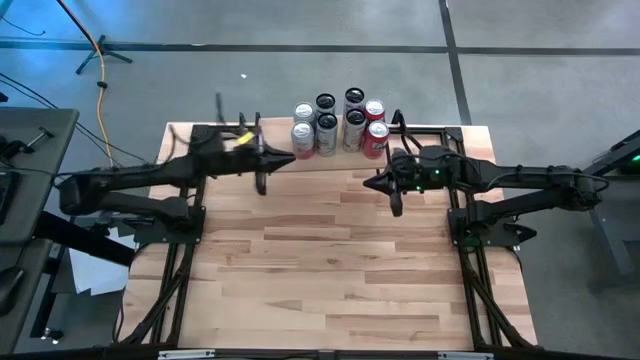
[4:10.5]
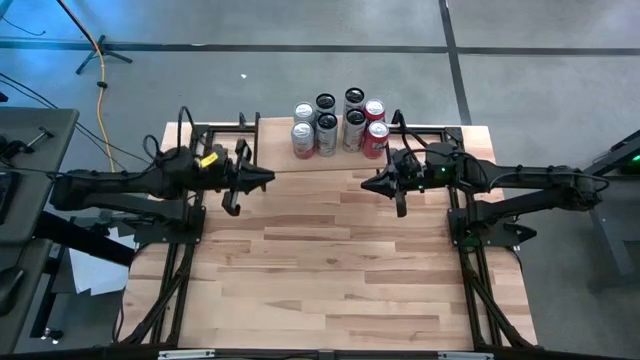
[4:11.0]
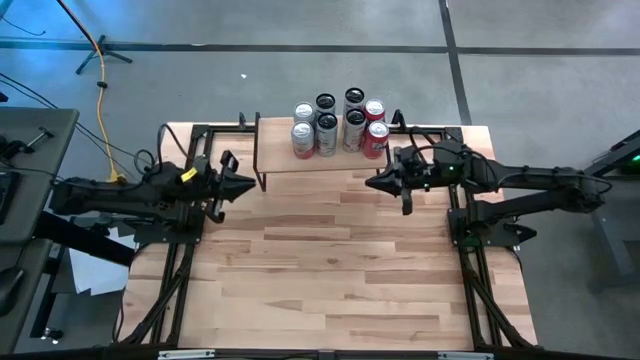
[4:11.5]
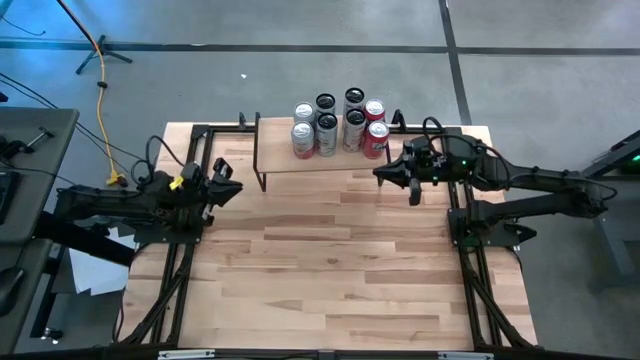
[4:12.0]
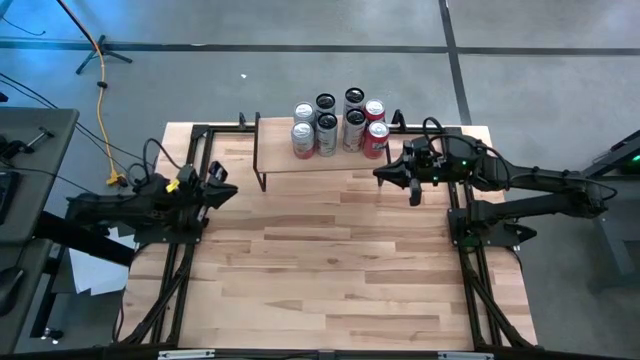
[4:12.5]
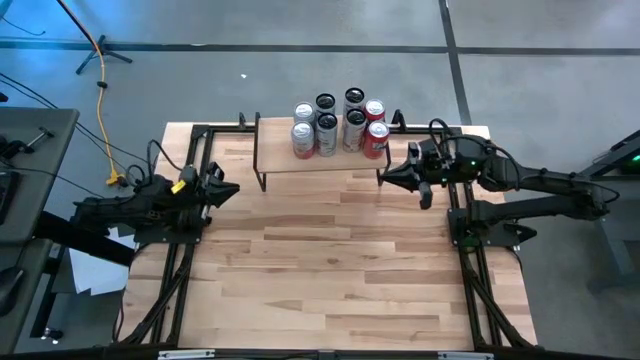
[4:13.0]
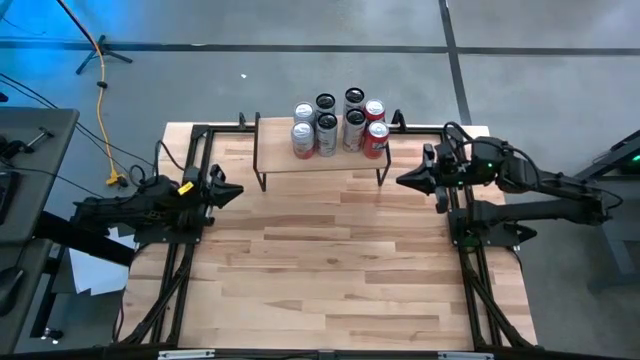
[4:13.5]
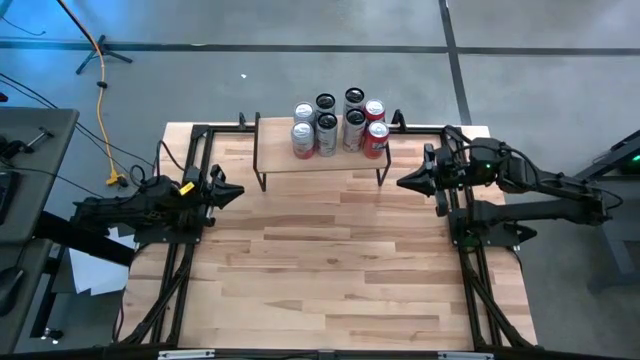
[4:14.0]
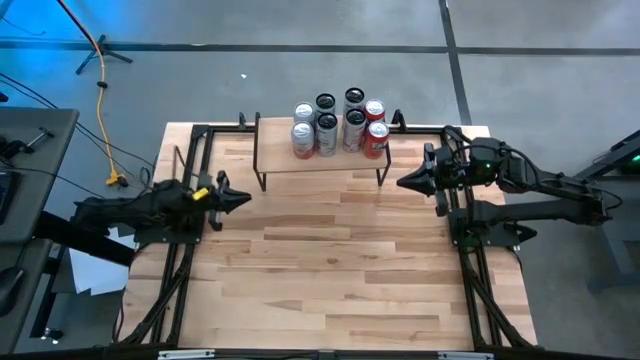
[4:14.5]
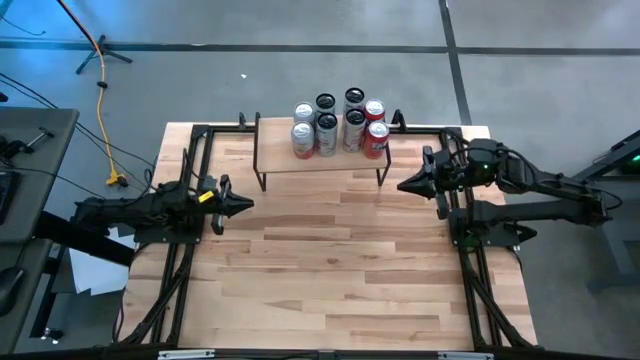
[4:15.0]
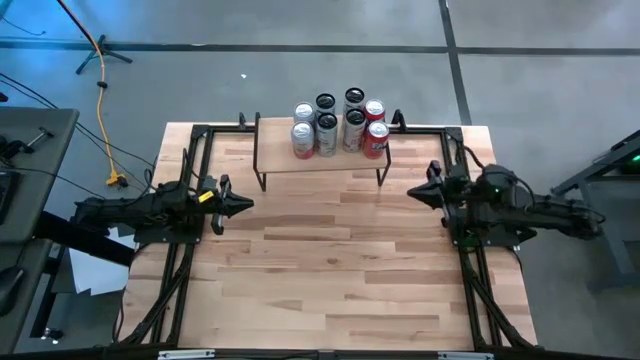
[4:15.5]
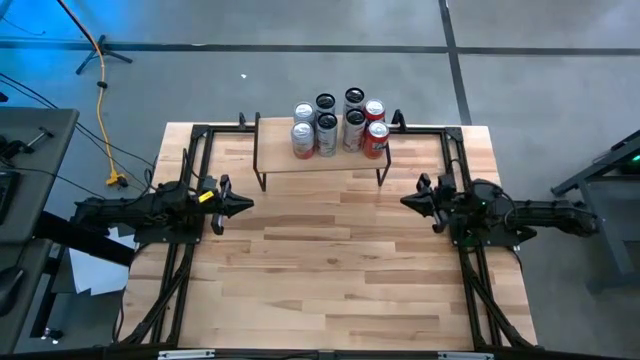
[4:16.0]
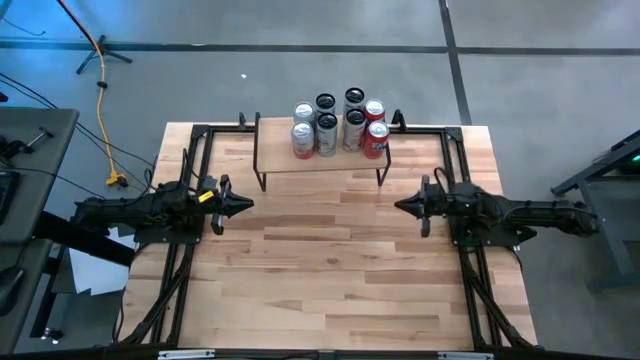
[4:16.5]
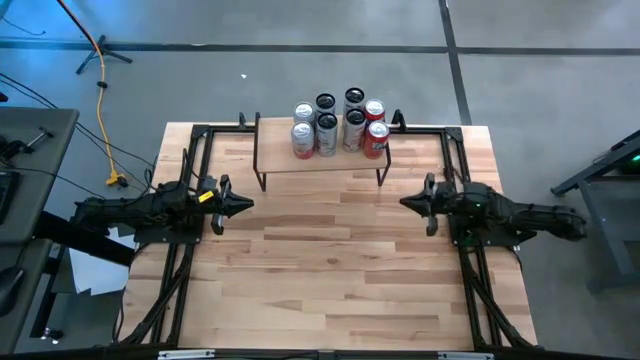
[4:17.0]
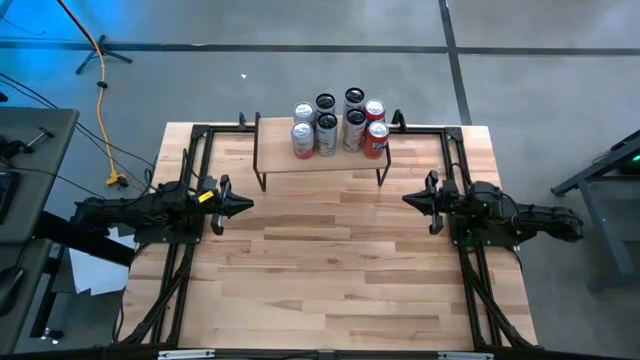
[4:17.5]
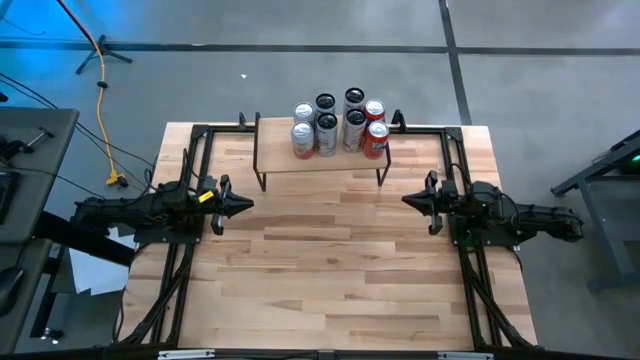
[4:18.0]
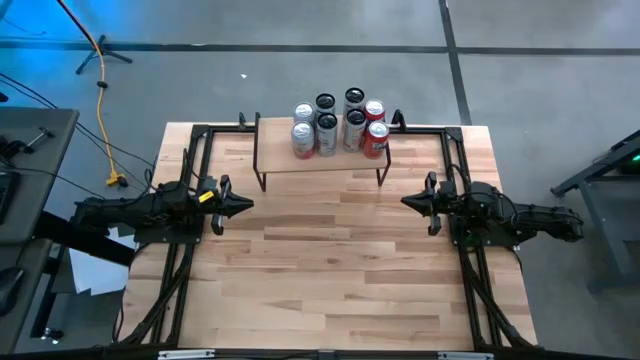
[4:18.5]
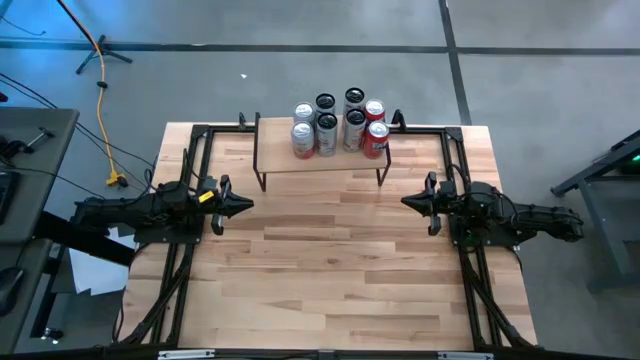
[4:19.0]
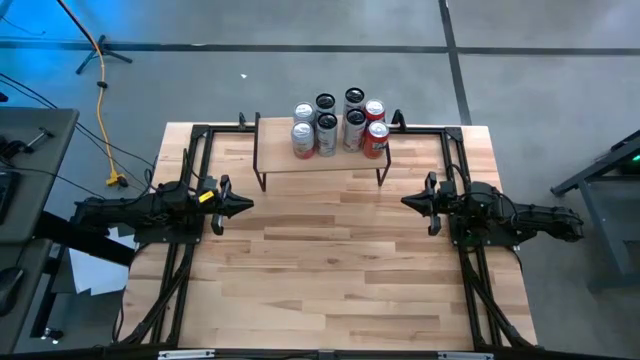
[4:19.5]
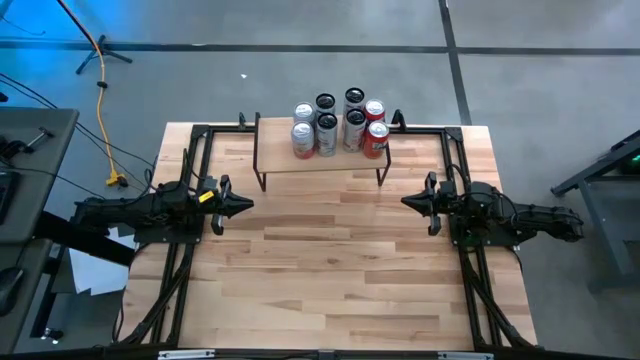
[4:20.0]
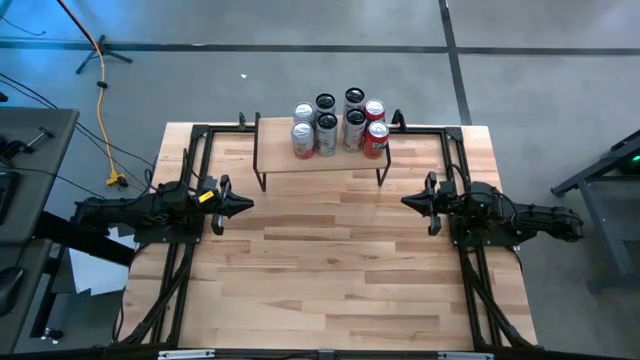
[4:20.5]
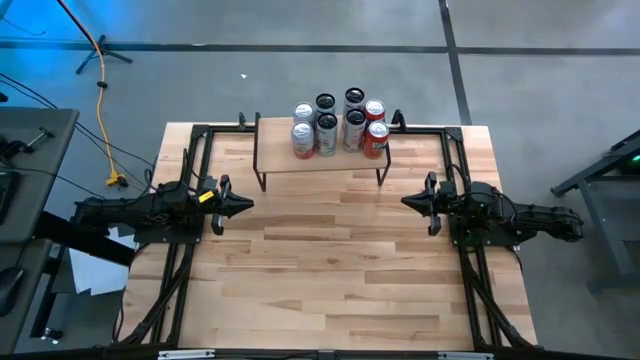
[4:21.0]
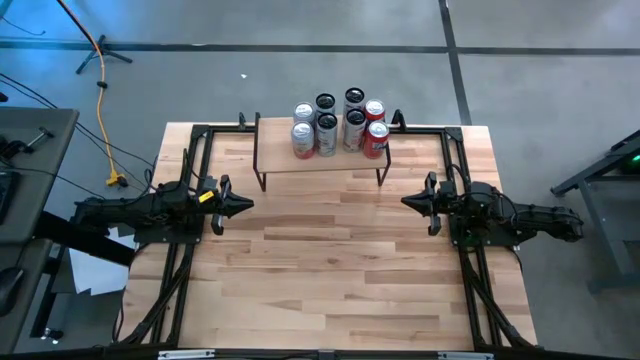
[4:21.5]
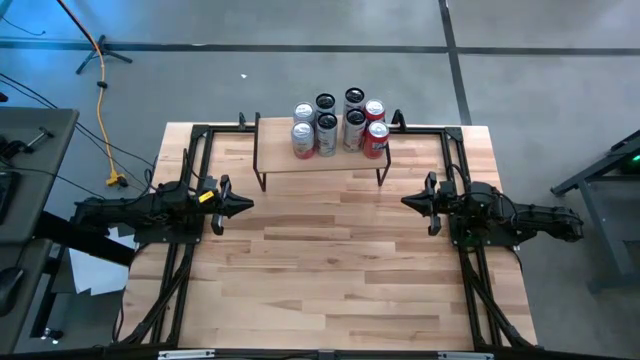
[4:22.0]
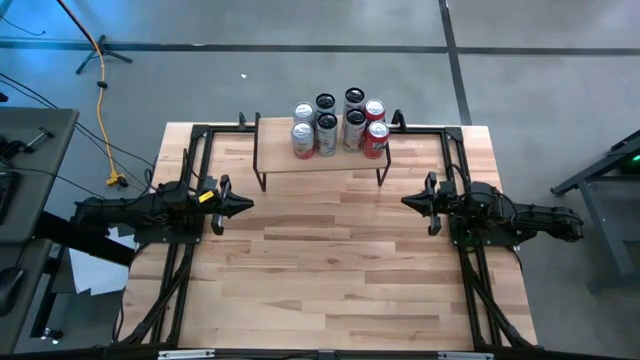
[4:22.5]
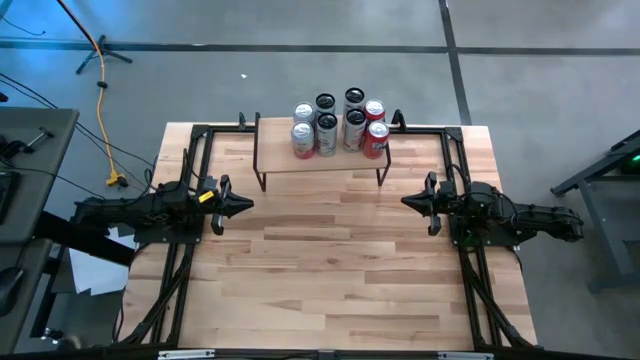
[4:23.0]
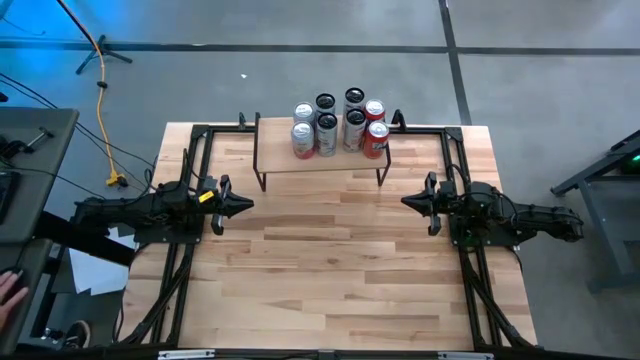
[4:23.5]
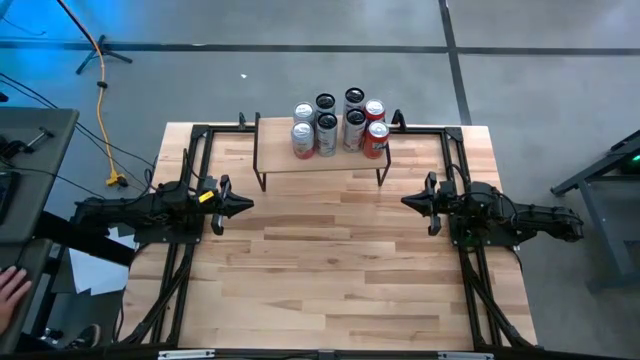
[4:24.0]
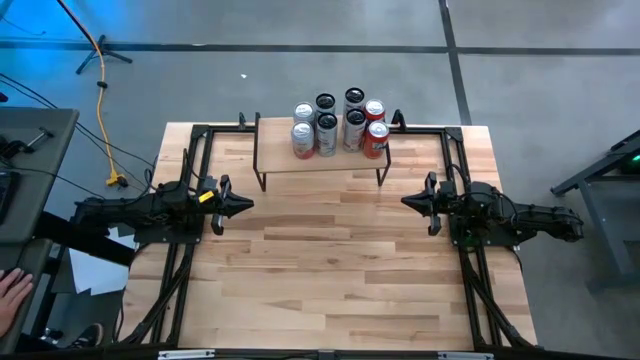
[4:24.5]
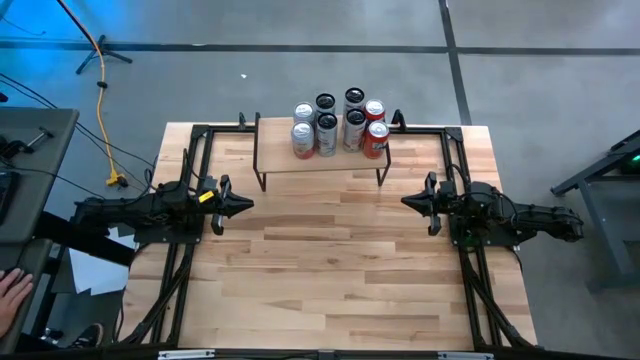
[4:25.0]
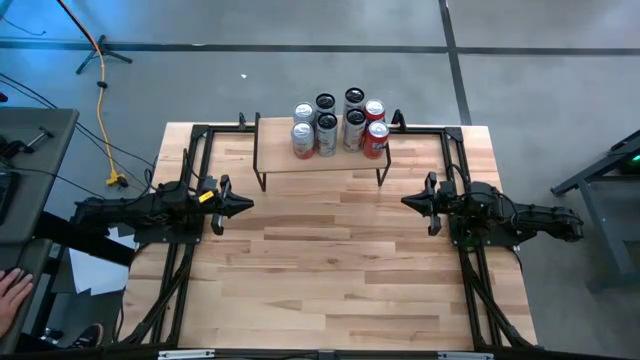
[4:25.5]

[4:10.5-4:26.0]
Task: Place canned beverage on shelf
Return to Home Position

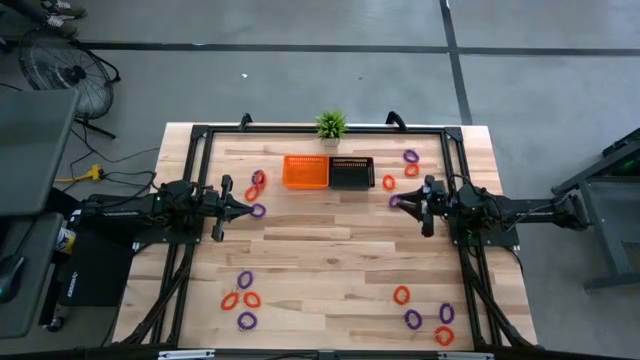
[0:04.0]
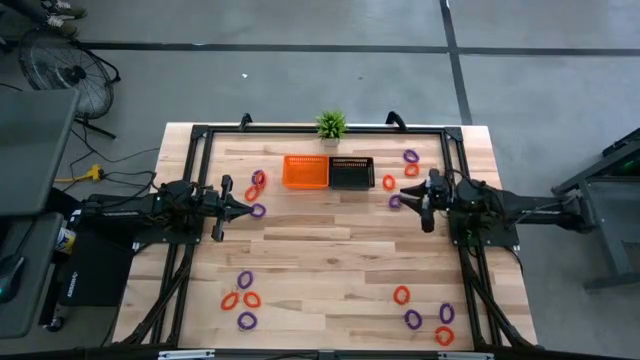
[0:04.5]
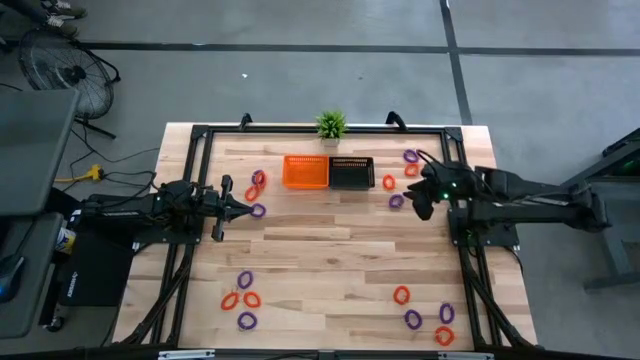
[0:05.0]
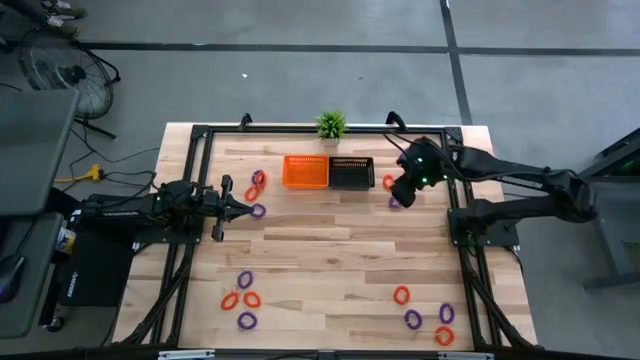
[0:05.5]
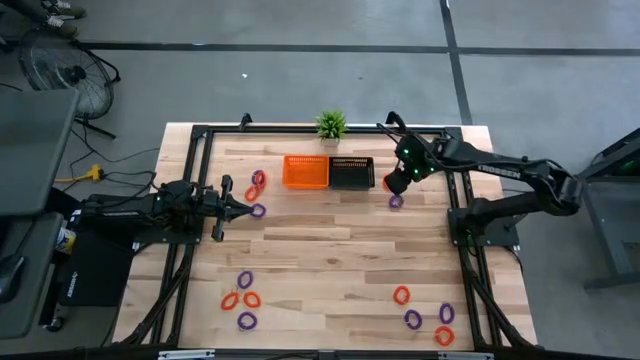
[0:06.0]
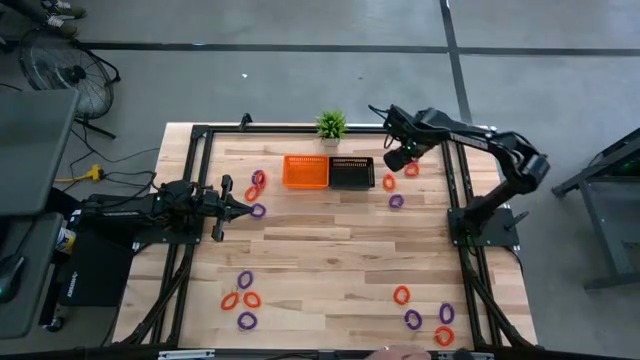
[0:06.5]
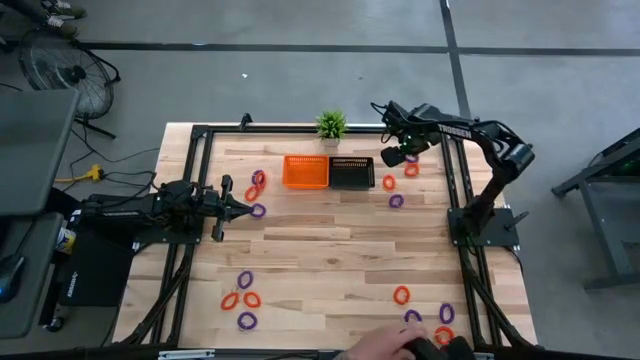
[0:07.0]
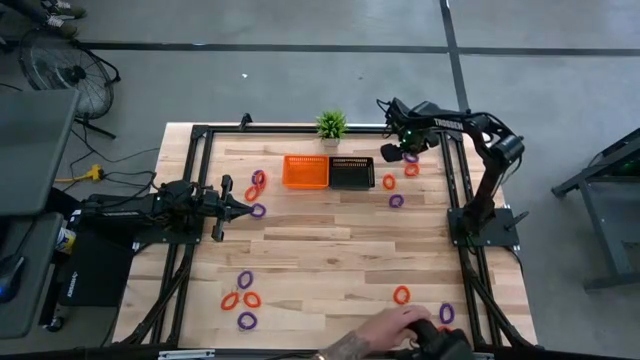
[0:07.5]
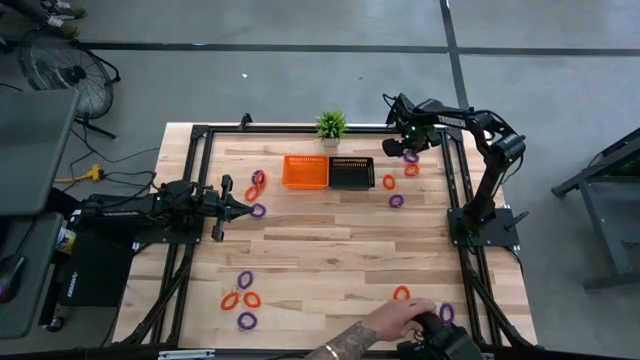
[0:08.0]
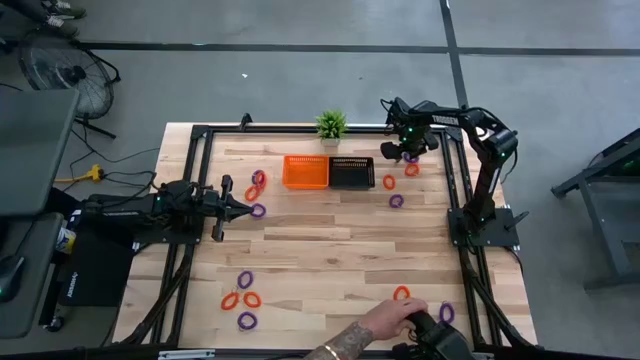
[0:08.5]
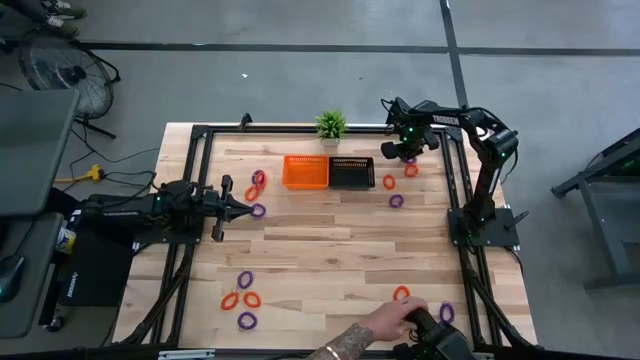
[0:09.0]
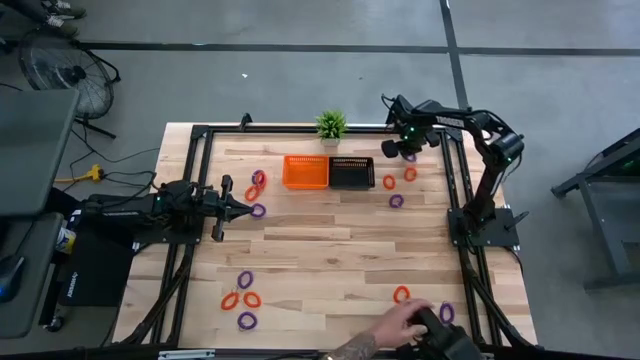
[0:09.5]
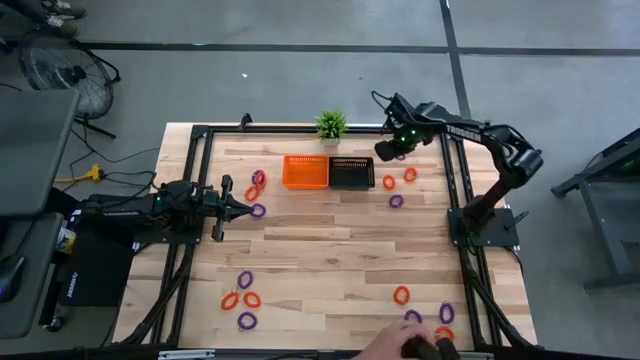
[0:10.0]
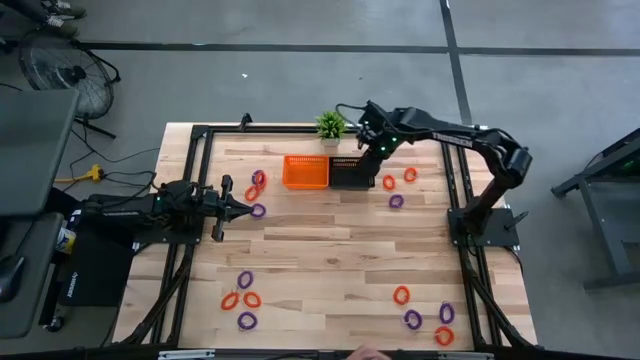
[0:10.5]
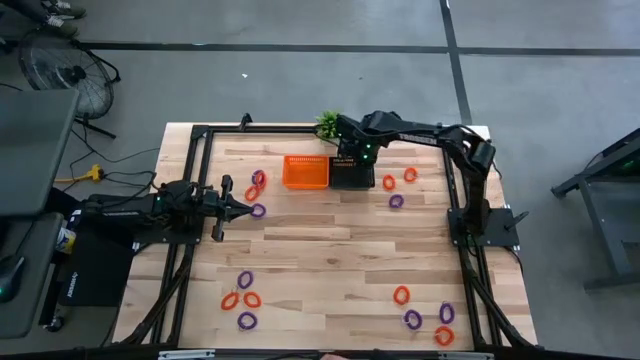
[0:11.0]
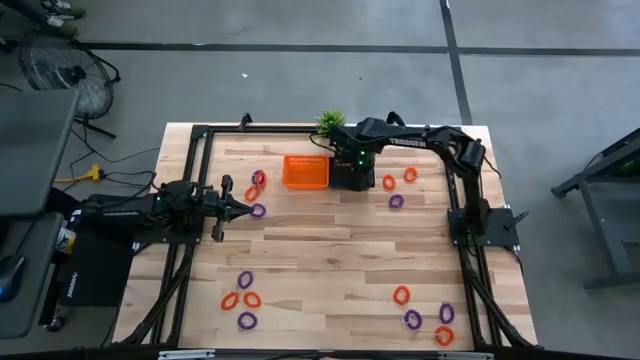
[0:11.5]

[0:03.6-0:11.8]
Task: Sort spring keychains into baskets
Put the purple spring keychain into the black basket
